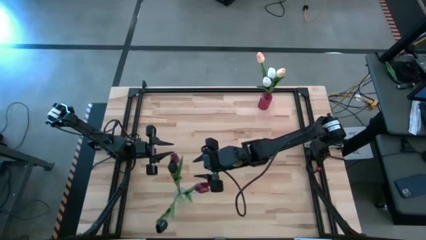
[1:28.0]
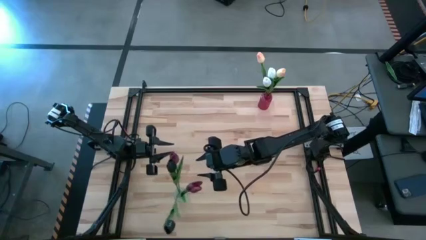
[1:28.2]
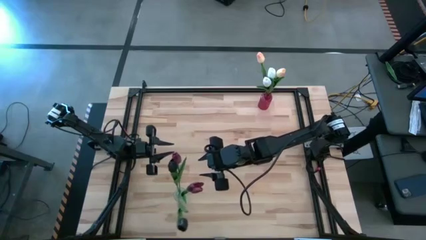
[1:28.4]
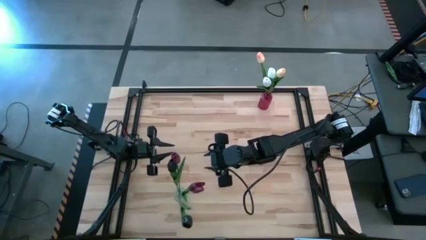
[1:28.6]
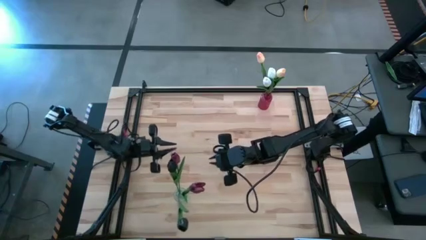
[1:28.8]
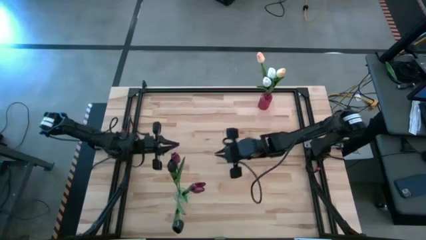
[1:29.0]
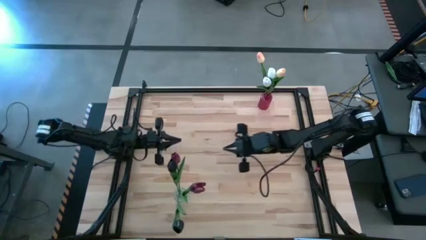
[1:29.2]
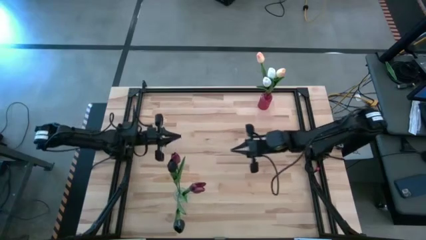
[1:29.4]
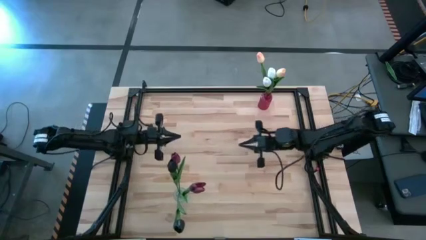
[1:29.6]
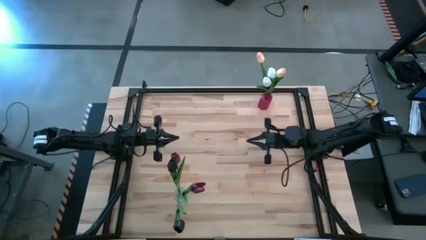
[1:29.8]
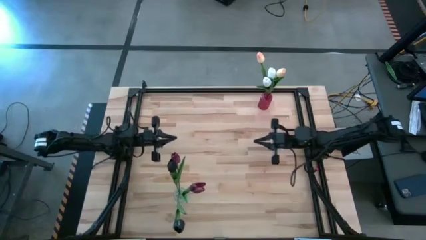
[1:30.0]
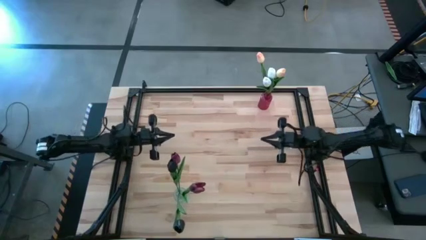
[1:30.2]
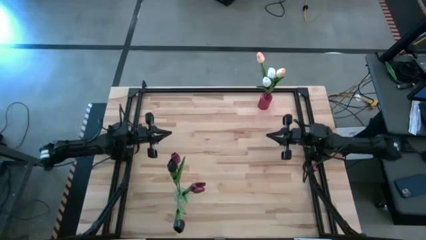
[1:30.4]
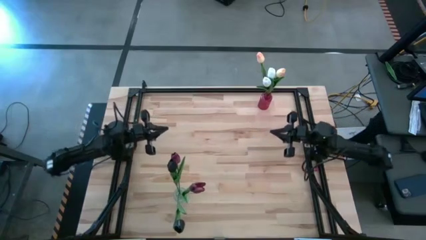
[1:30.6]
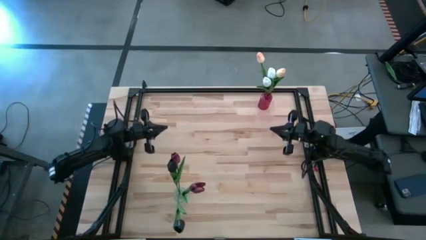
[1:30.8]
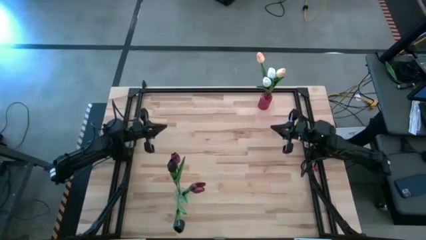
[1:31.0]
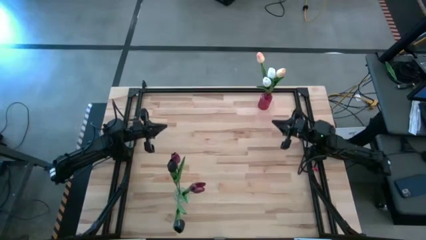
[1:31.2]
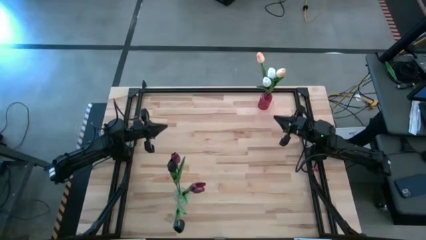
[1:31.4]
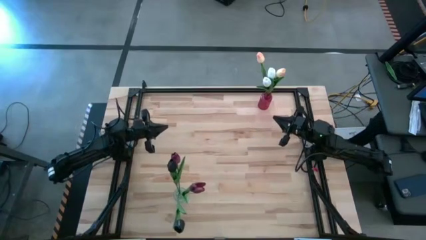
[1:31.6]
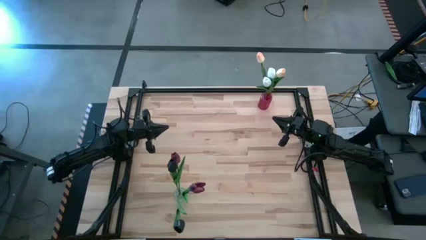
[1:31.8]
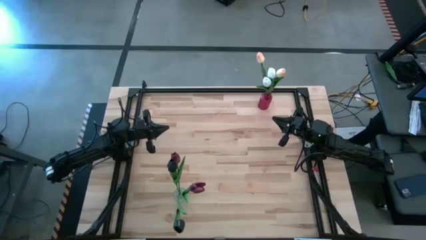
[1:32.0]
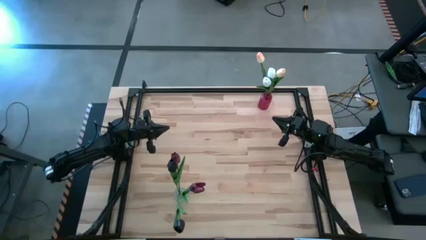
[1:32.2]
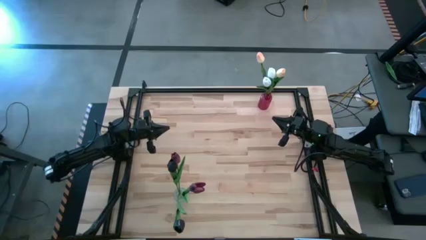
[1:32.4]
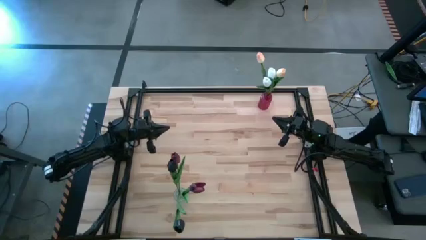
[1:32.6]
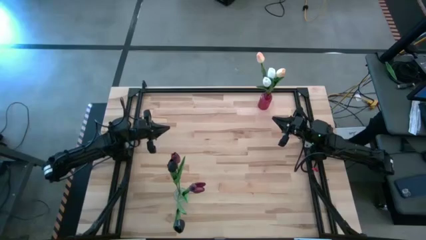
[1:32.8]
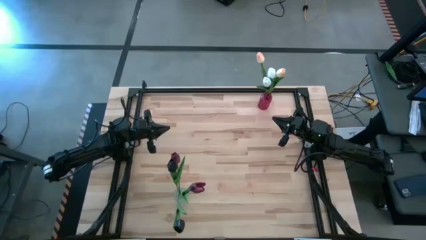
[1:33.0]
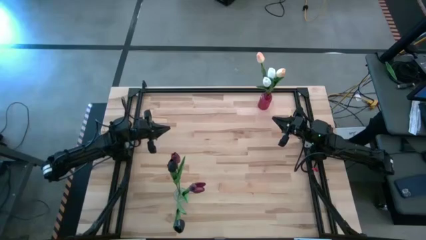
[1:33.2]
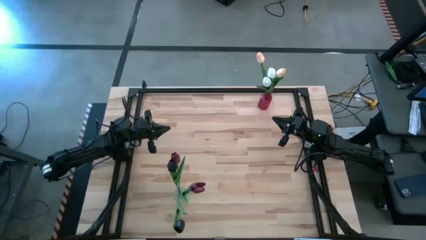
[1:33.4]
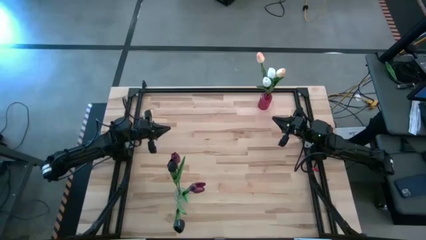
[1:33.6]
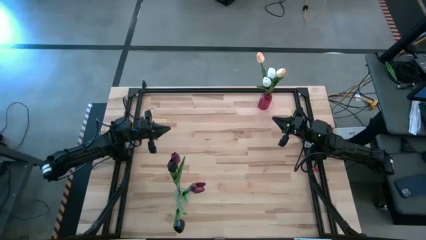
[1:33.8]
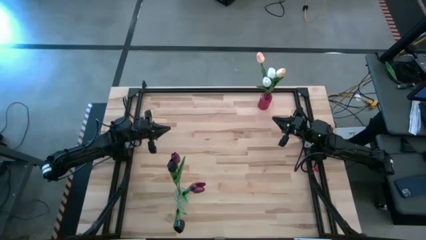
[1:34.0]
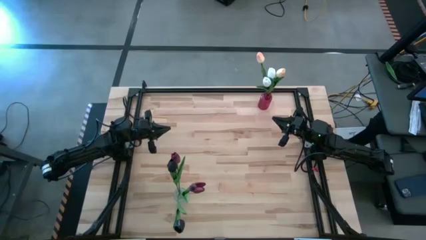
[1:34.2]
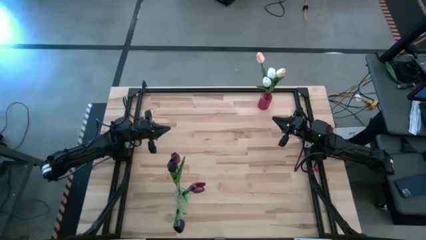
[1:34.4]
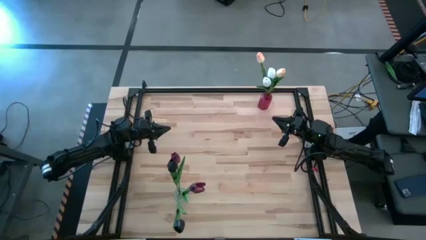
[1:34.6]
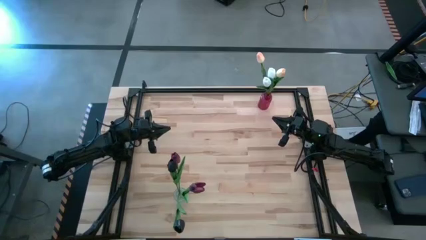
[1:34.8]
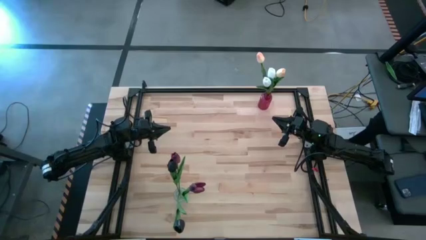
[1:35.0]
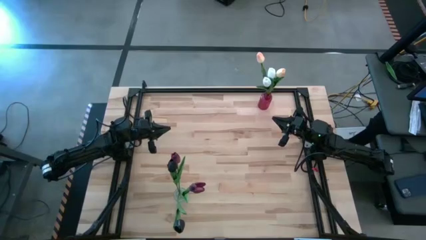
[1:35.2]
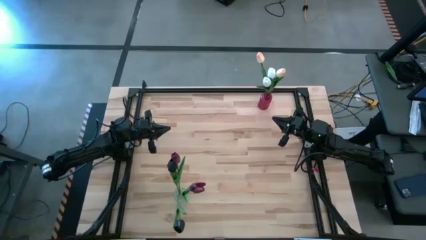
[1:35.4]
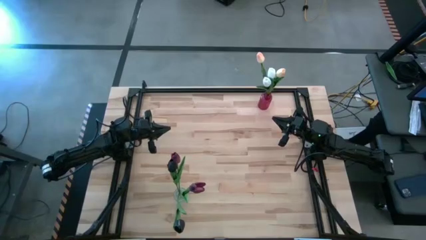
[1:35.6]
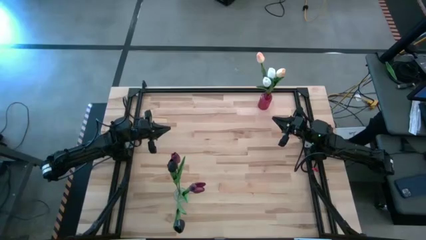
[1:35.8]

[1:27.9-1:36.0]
Task: Sort flowers into vase by color
Return to Home Position
